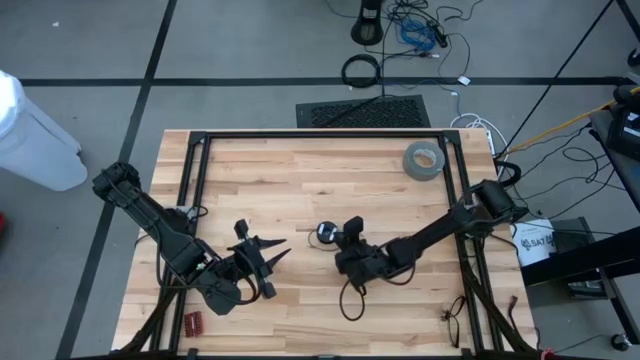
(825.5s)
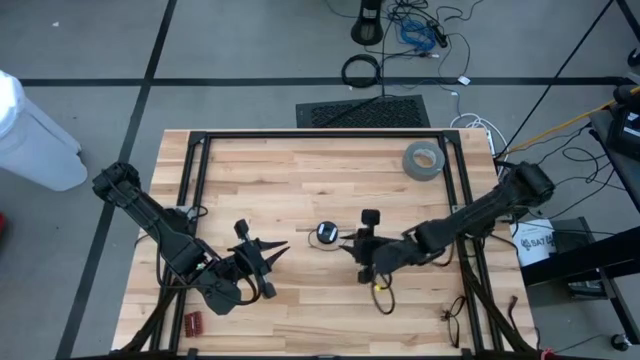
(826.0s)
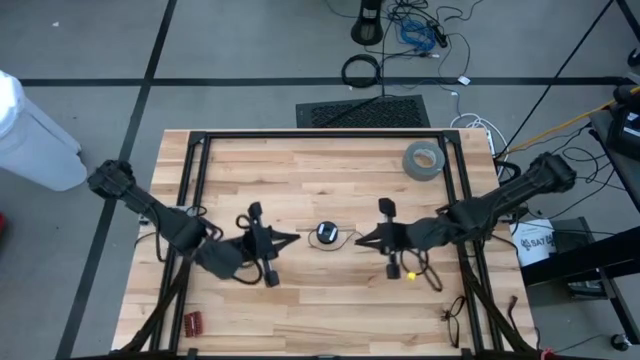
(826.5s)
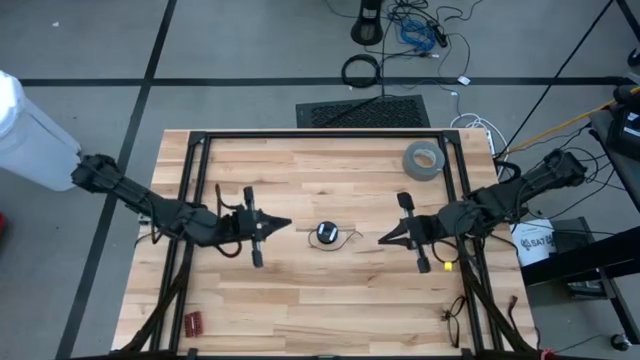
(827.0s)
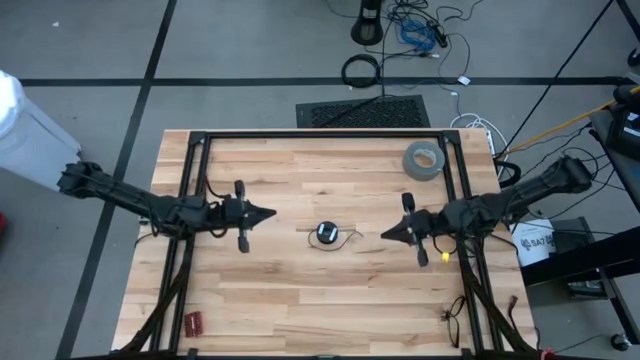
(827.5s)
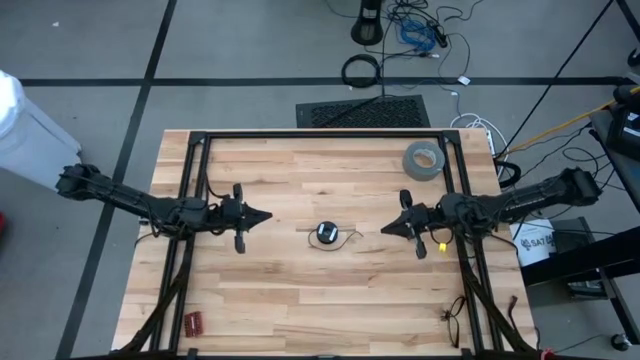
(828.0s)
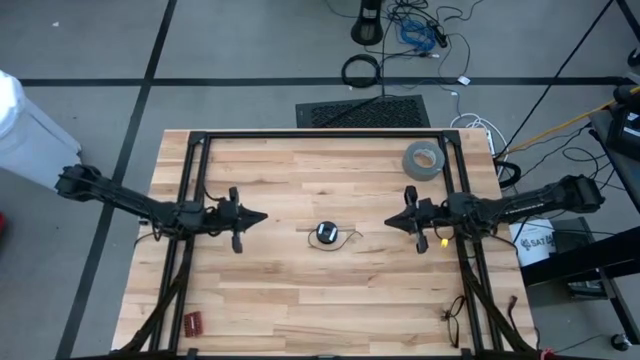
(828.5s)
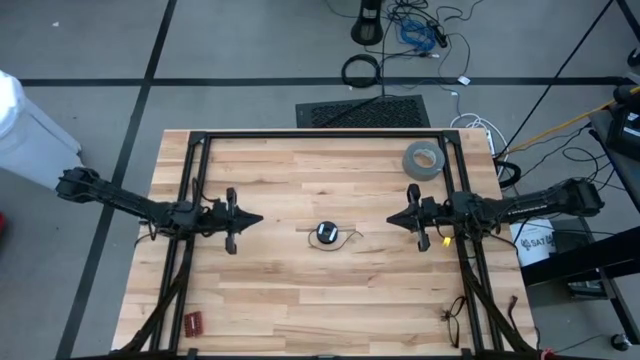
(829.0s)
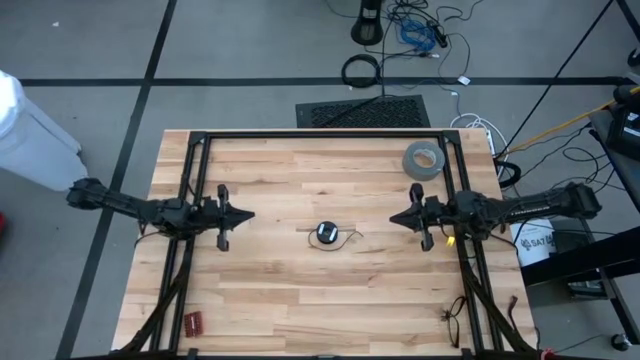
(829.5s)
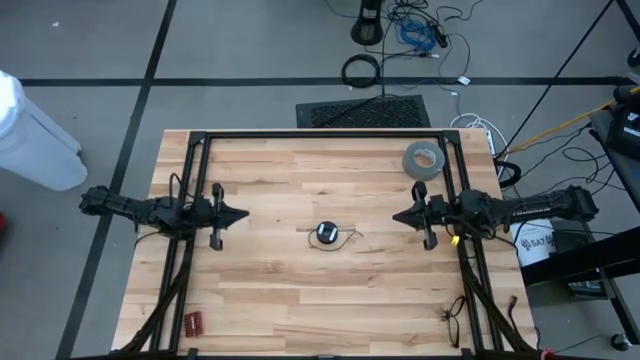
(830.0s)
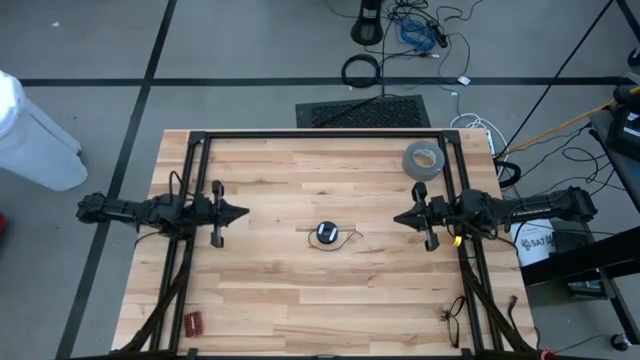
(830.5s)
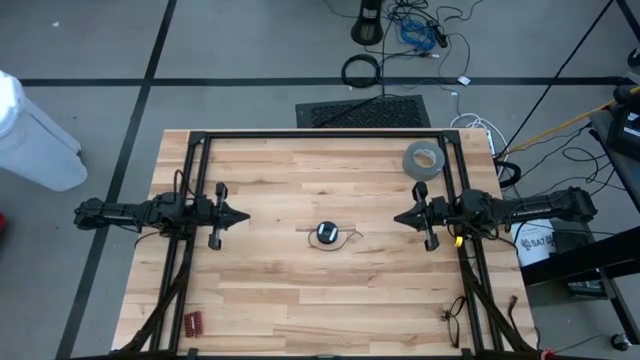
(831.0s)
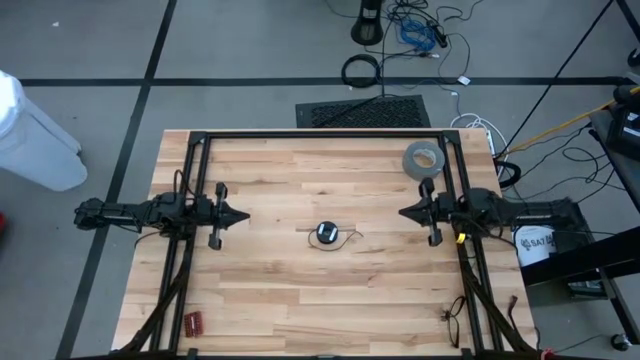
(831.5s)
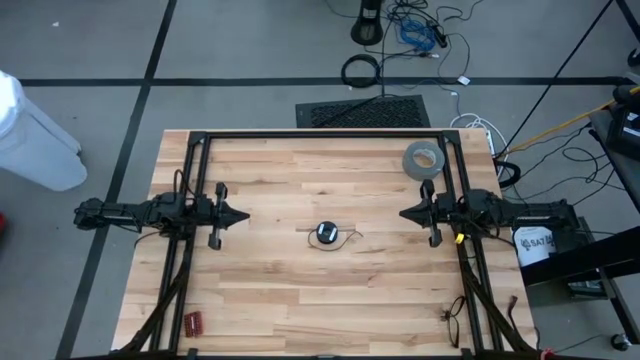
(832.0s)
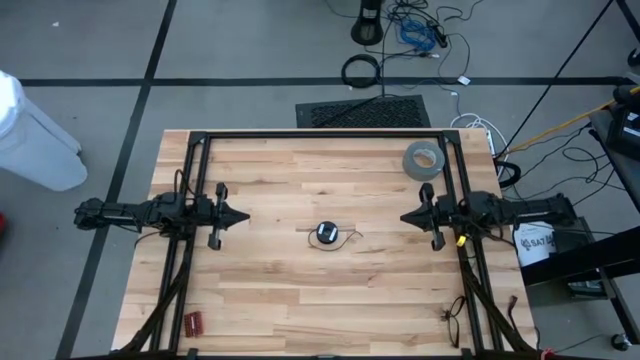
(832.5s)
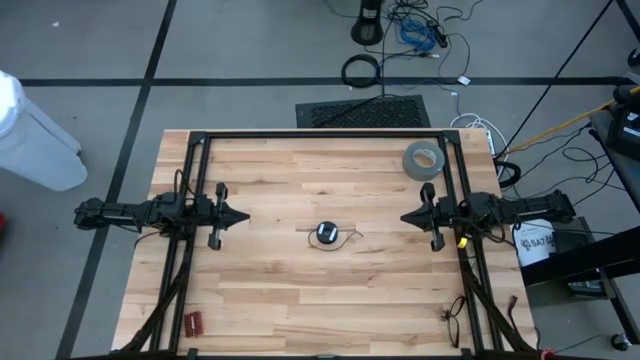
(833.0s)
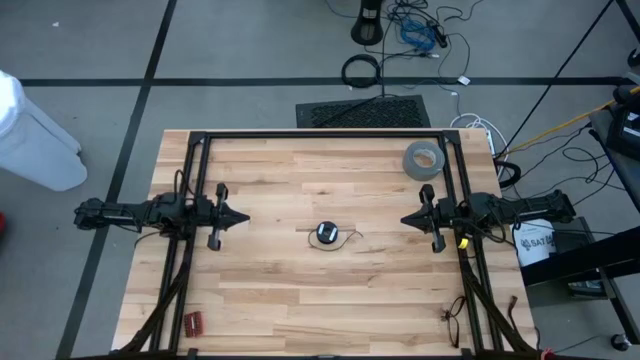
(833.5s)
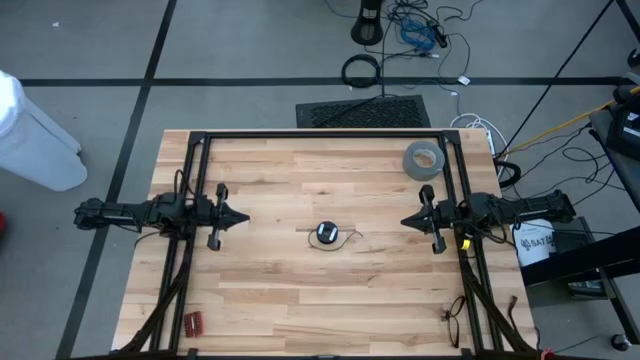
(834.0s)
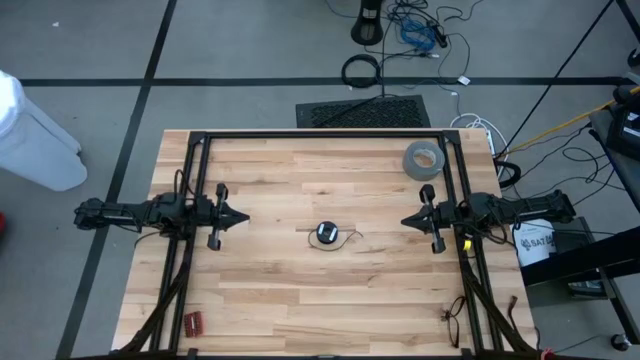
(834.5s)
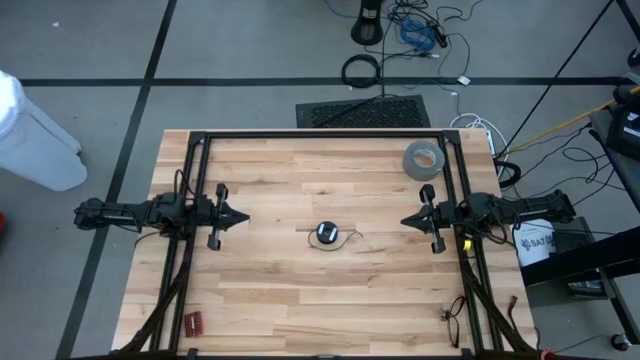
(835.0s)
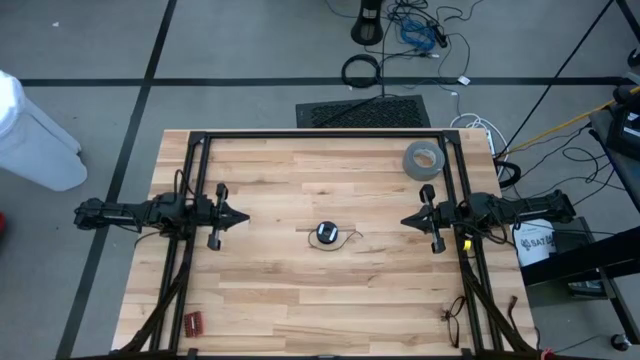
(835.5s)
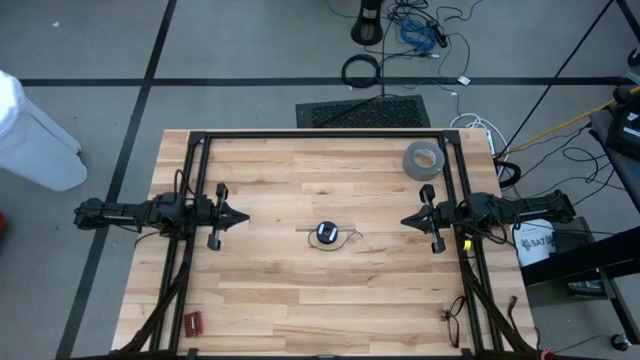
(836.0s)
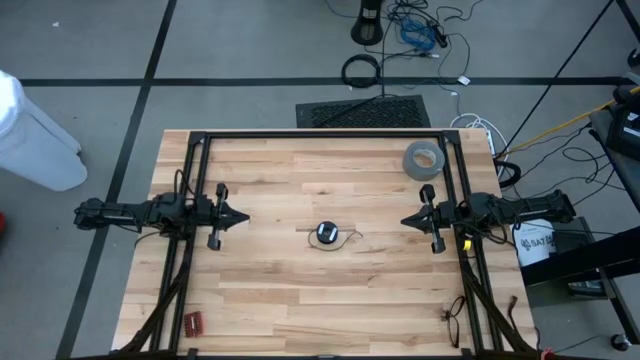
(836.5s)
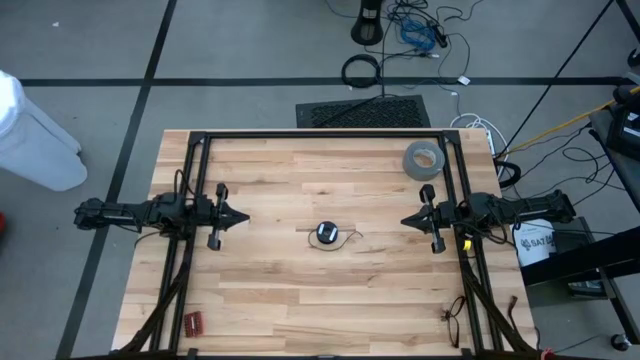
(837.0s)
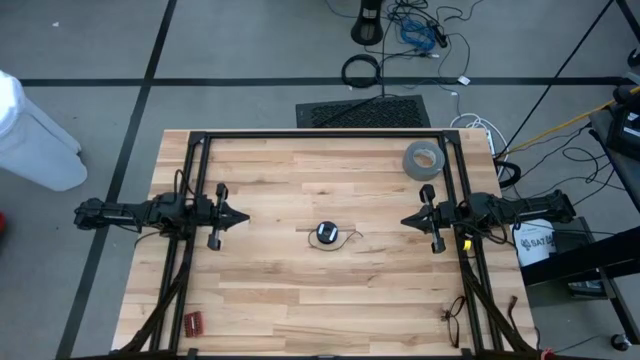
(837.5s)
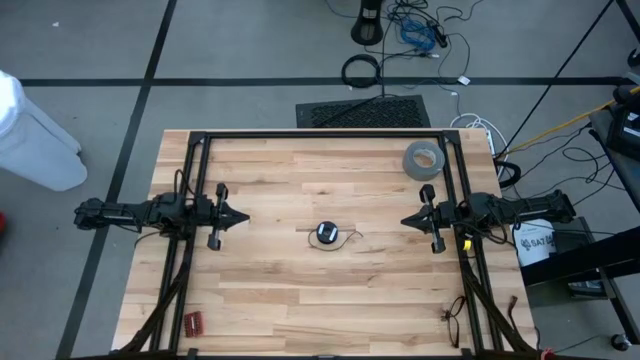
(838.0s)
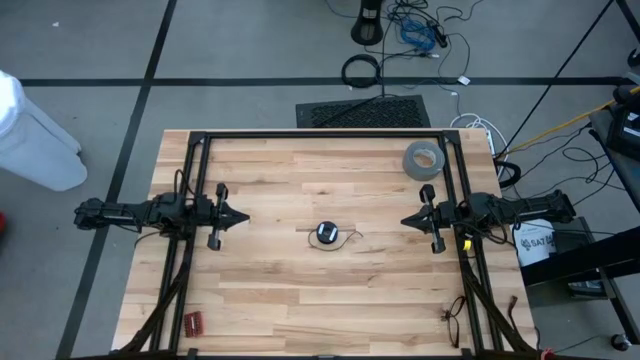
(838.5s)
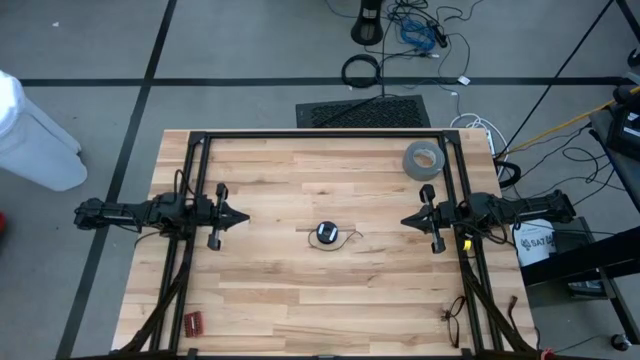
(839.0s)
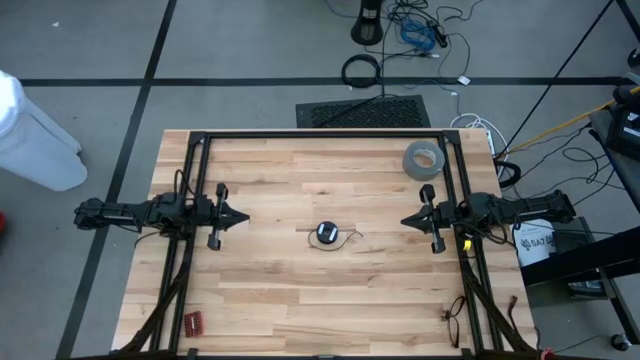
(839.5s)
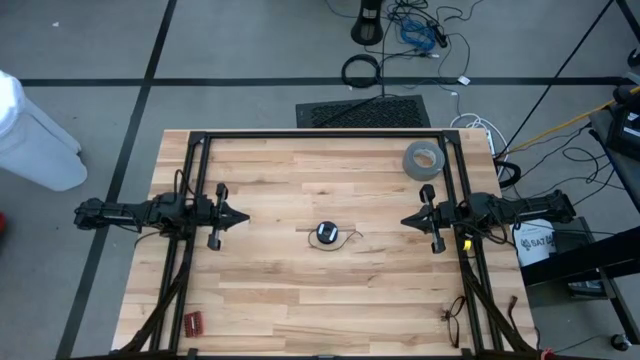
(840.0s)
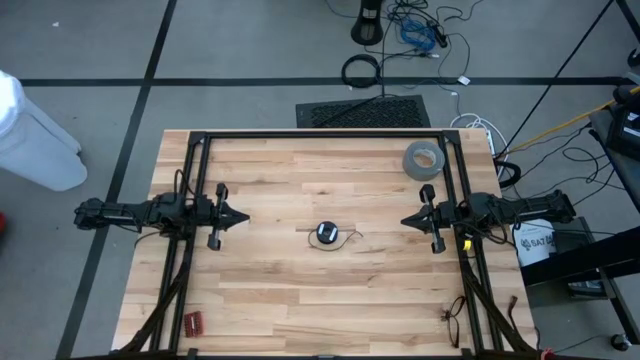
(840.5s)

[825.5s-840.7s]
Task: Coil cords
Return to Home Position
